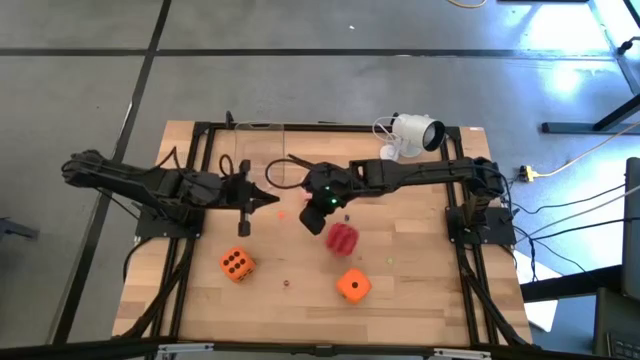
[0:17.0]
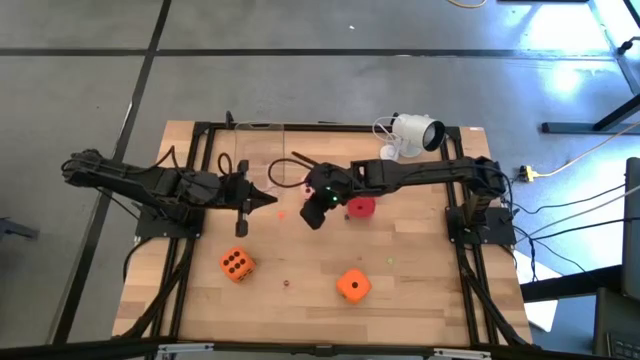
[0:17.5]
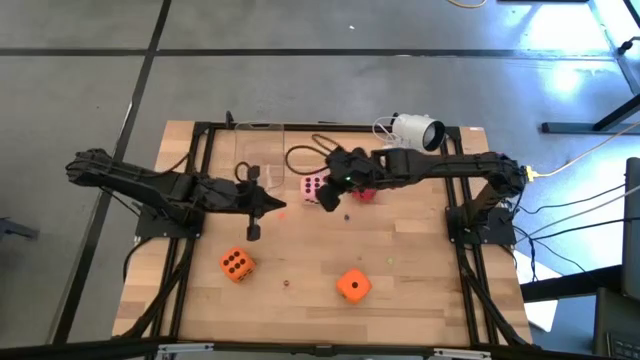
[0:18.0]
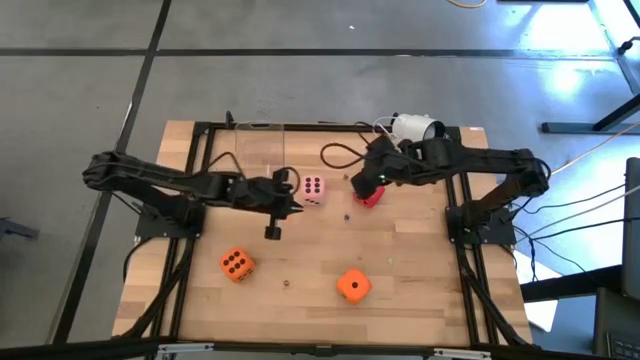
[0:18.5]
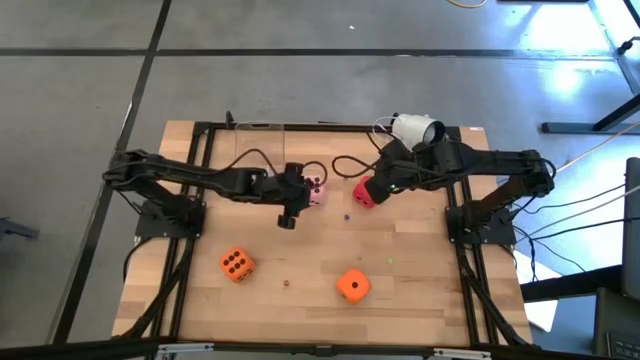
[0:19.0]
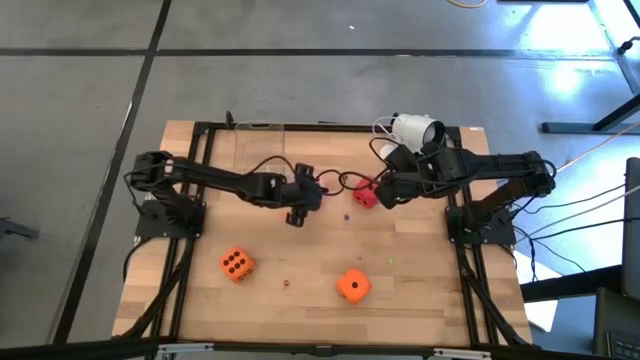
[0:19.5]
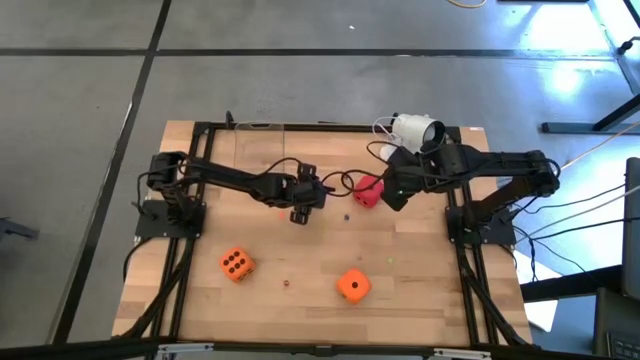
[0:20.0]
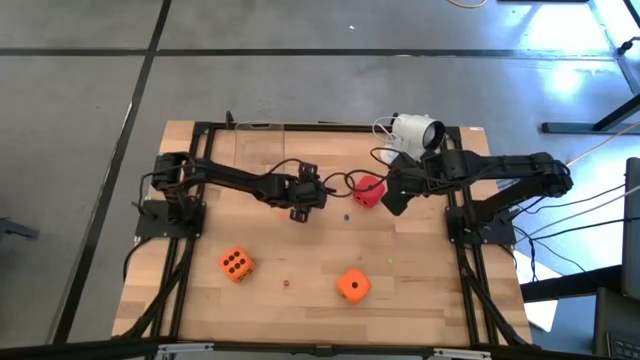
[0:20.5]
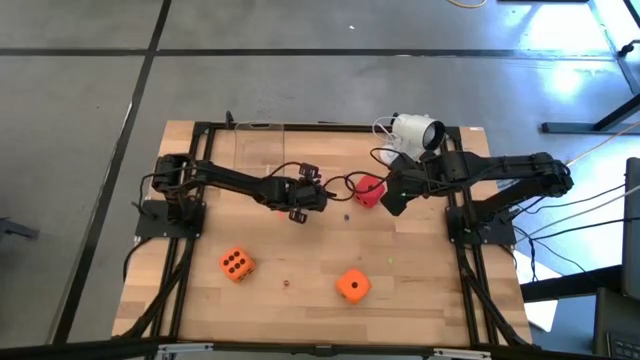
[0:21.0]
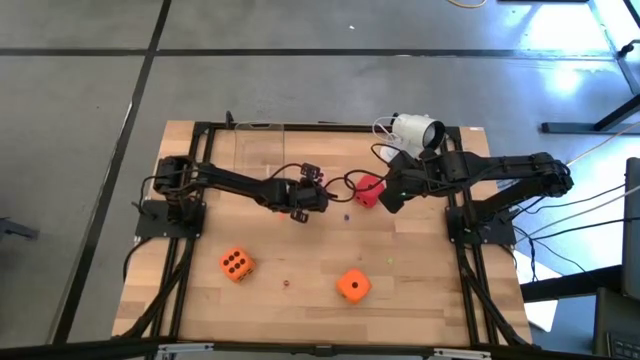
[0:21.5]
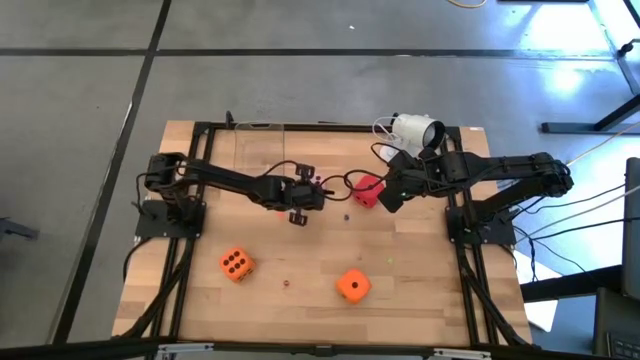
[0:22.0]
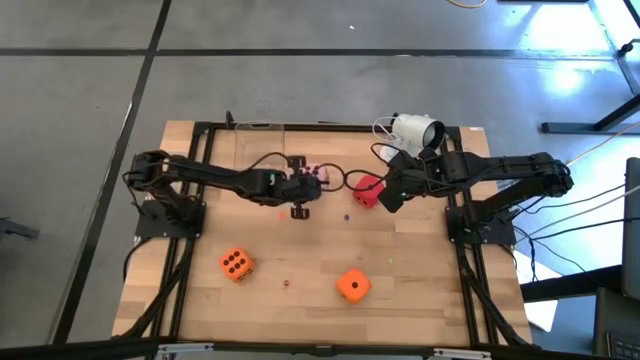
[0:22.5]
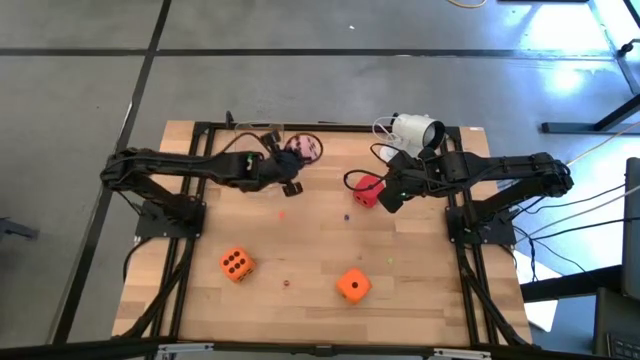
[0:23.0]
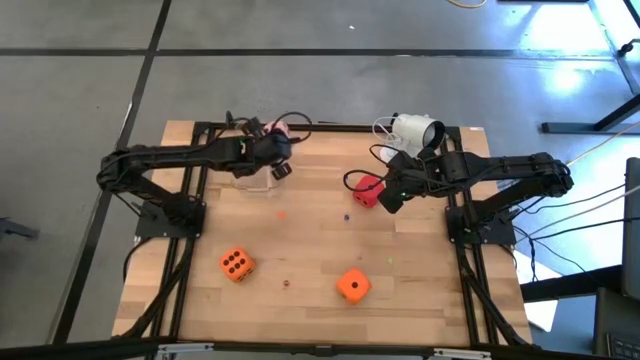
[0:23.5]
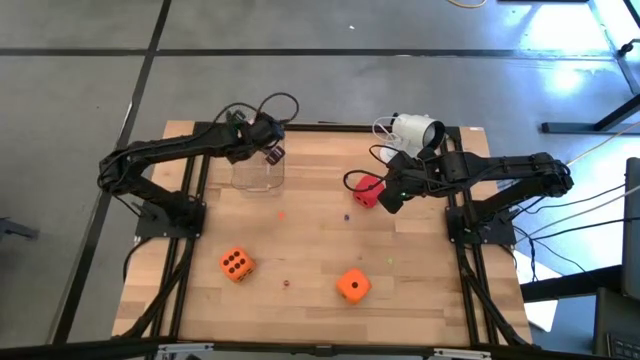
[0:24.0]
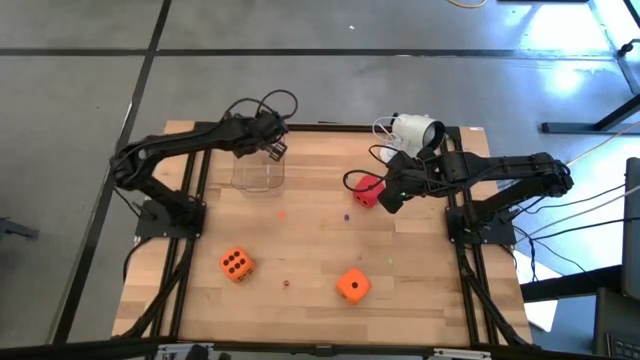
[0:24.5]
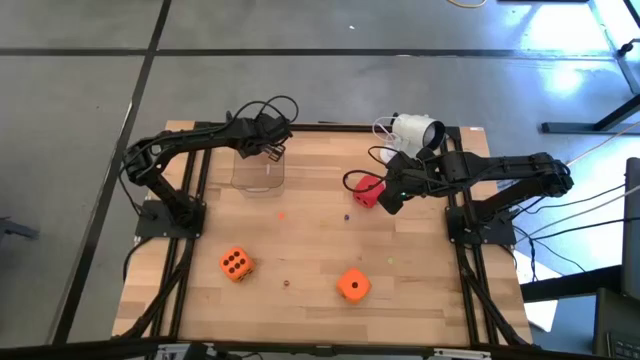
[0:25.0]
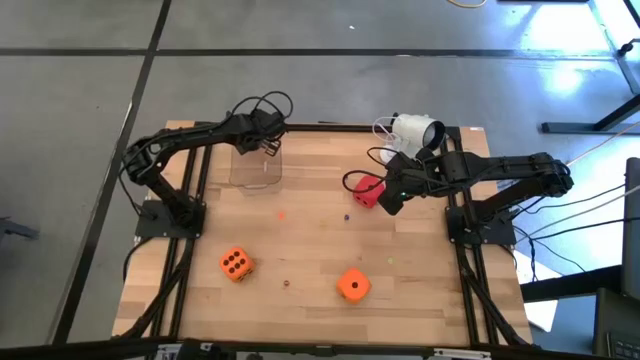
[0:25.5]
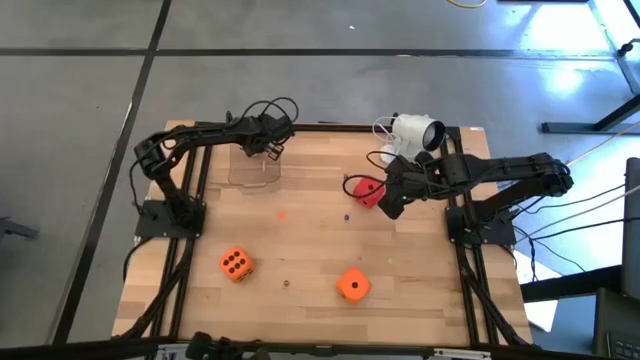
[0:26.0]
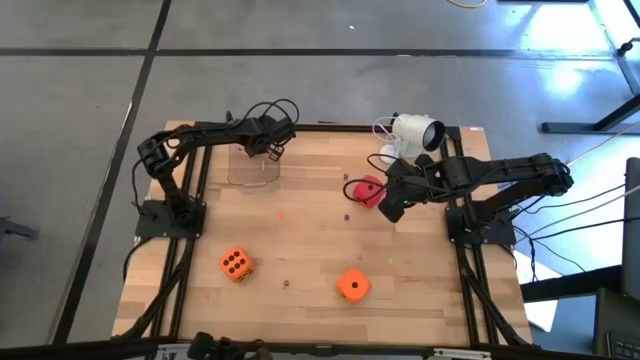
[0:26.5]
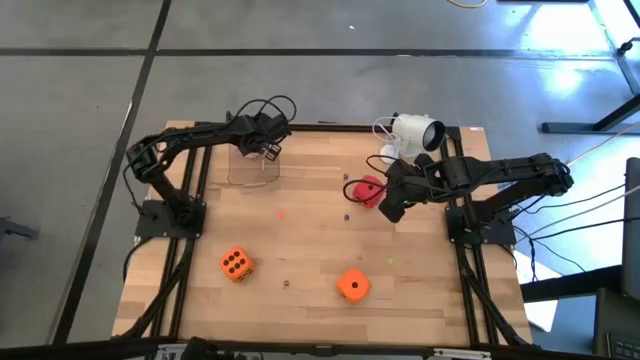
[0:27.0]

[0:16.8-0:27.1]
Task: Pick & Place Dice
Put the large pink dice into the transparent bin

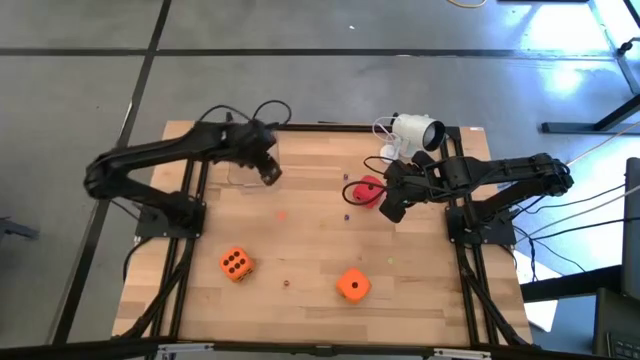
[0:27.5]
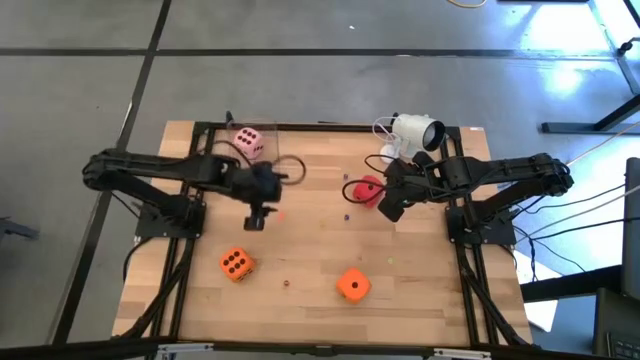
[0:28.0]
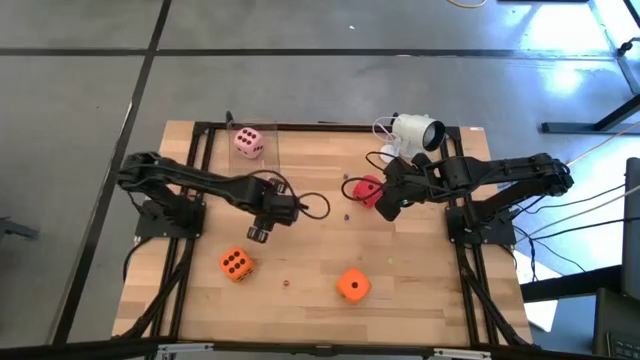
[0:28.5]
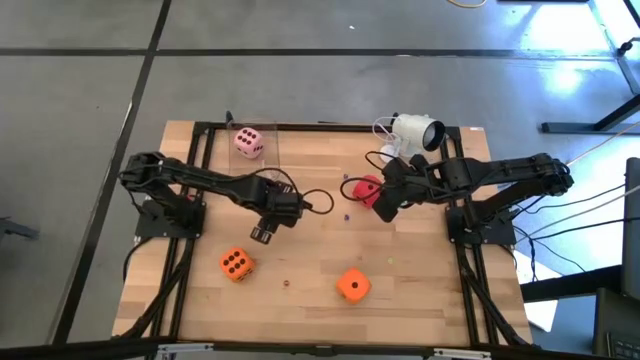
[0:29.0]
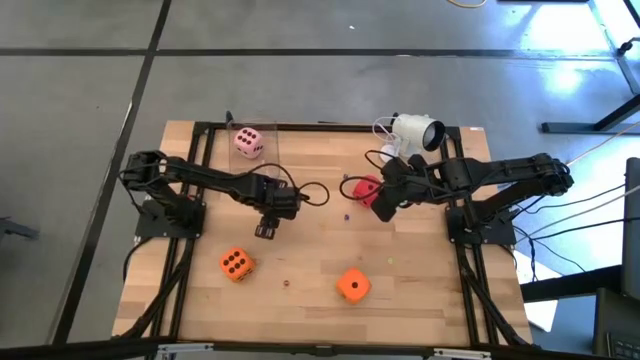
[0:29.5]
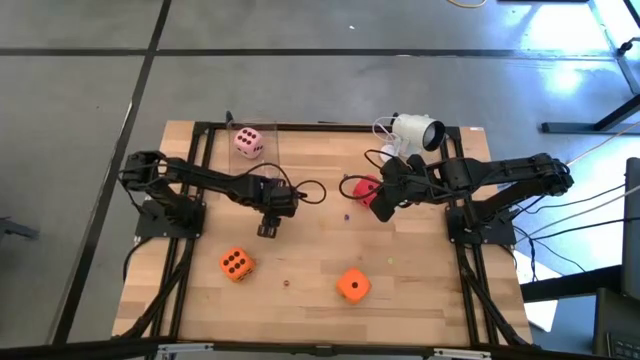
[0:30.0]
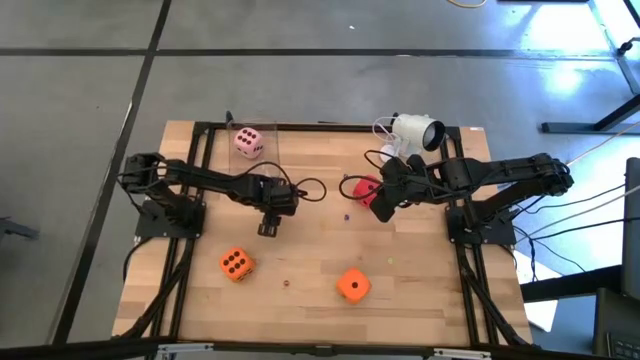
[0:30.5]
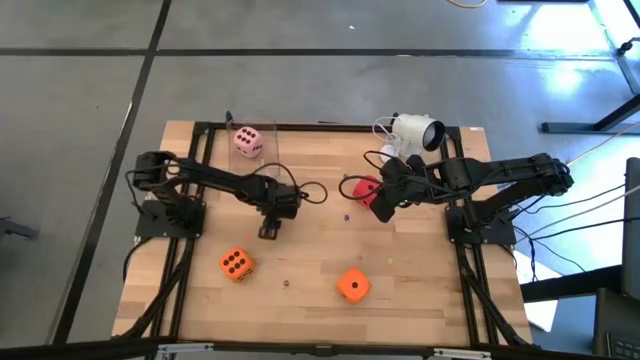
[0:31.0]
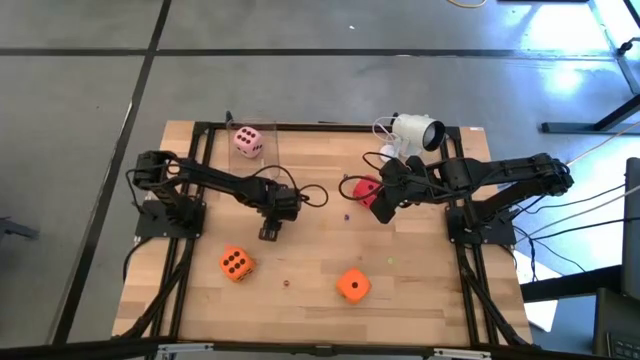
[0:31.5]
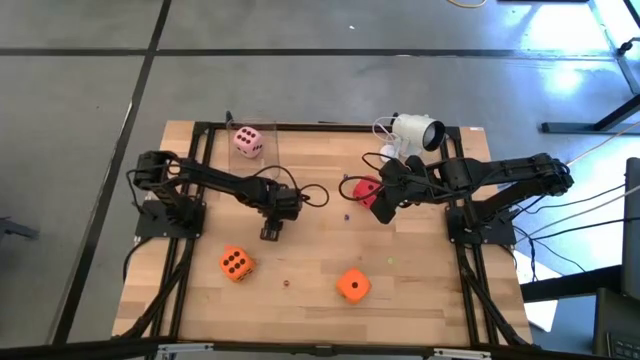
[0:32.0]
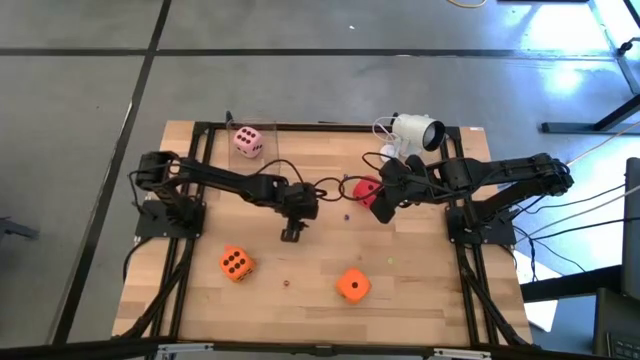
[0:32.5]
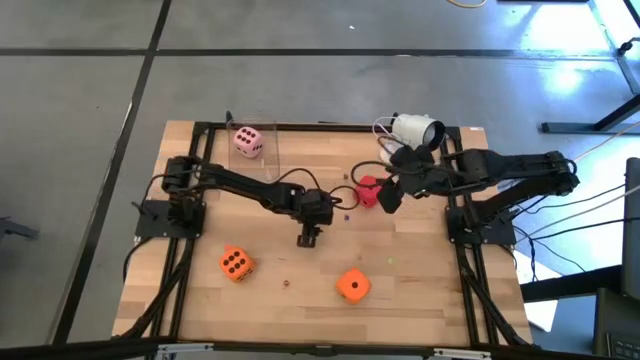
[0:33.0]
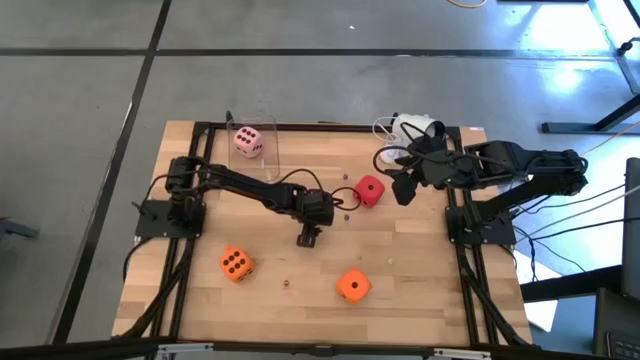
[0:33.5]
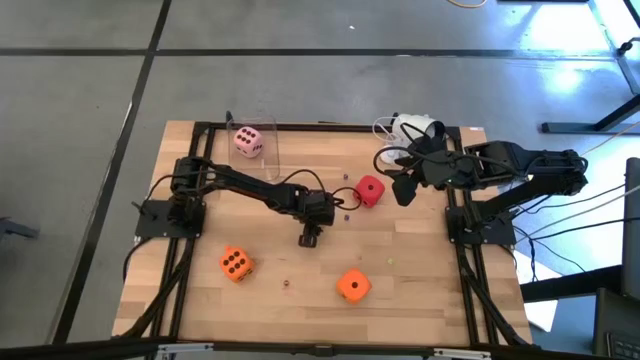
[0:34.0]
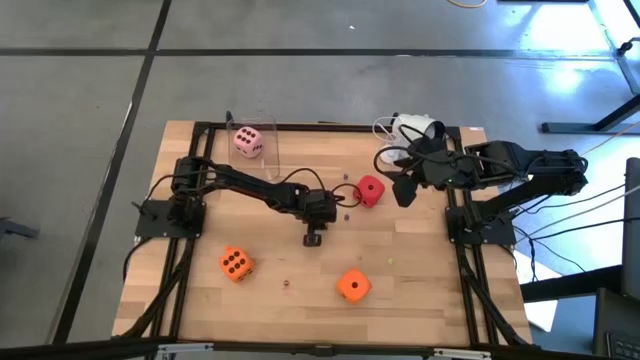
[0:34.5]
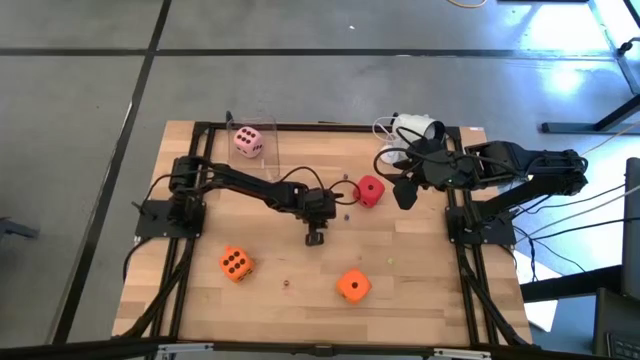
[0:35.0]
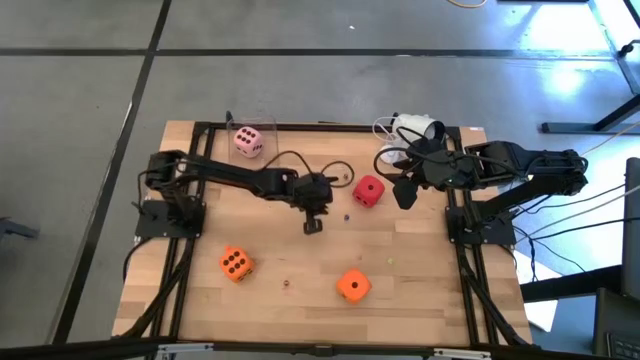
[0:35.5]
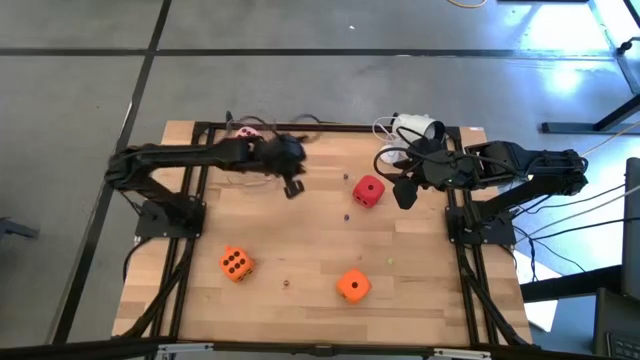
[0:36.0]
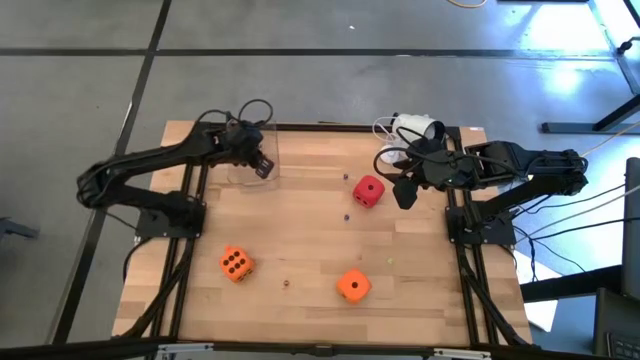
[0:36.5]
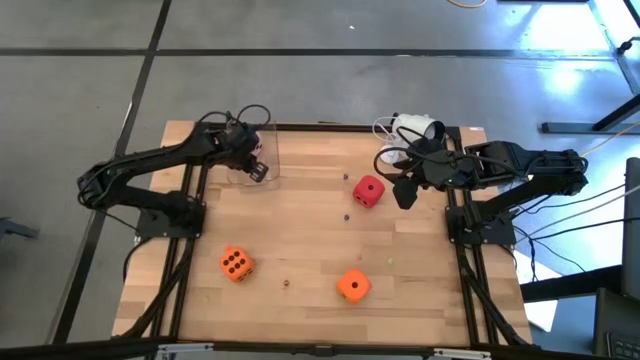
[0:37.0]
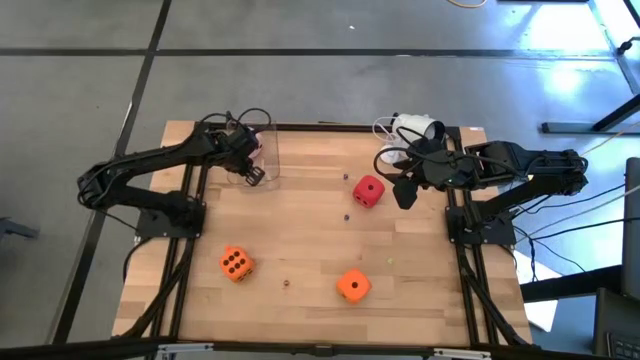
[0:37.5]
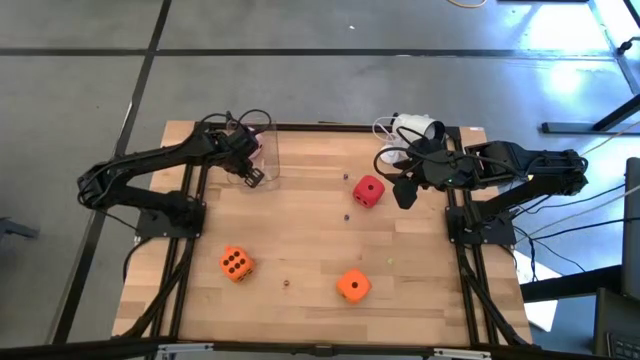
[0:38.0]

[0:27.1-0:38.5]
Put the small yellow dice into the transparent bin

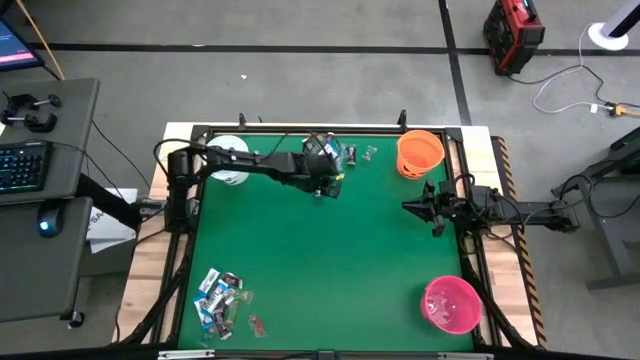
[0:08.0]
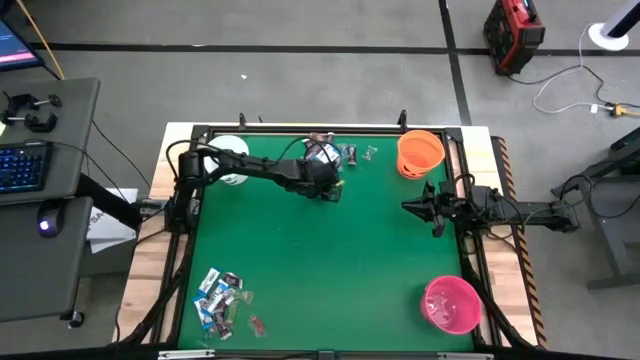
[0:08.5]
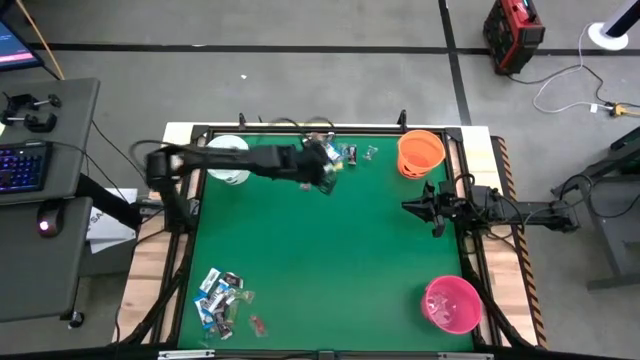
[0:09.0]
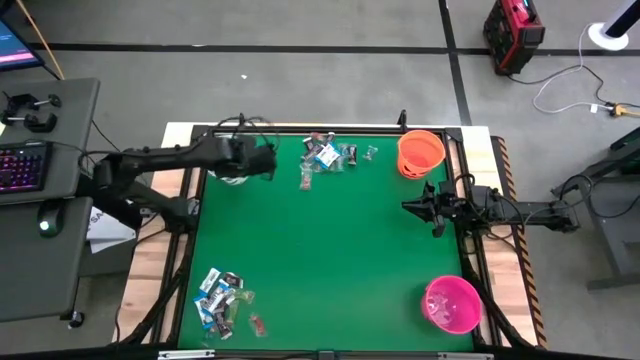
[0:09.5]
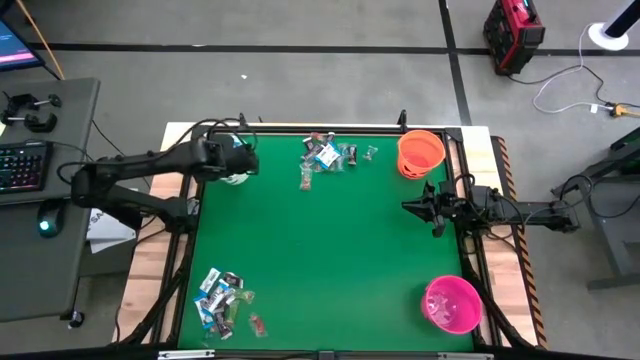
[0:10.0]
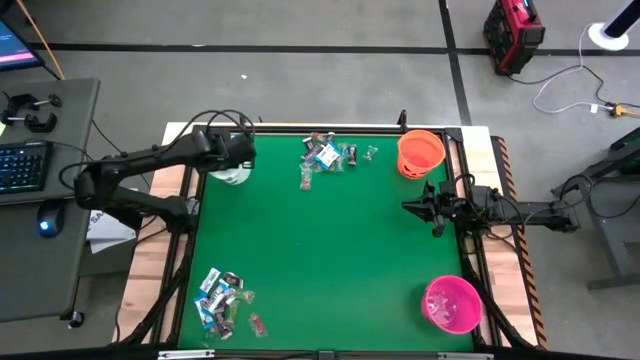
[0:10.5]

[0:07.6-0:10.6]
Task: Sort candy by brand, put in halloween buckets
Put the white chocolate bar into the white bucket
